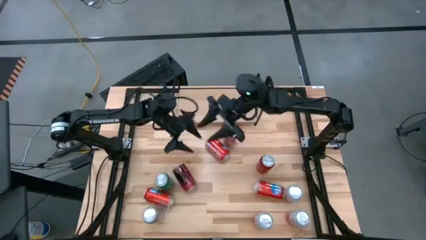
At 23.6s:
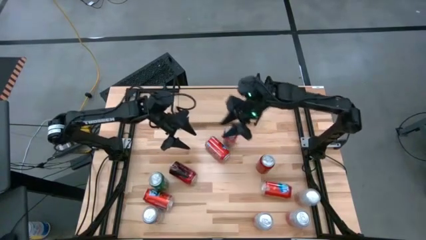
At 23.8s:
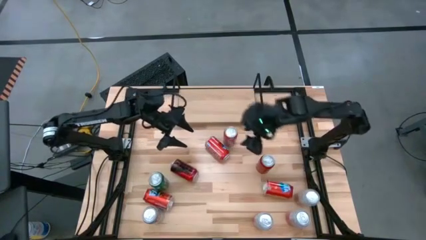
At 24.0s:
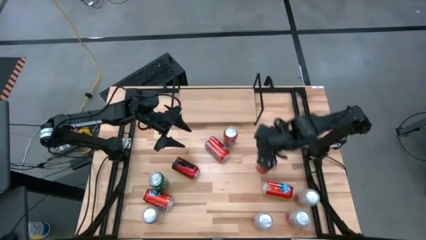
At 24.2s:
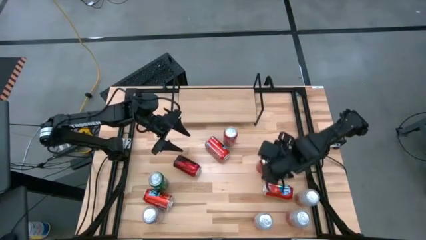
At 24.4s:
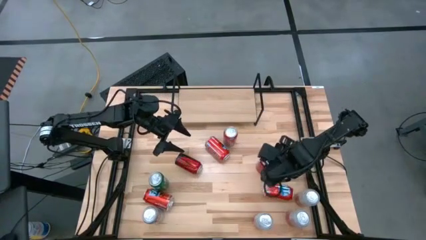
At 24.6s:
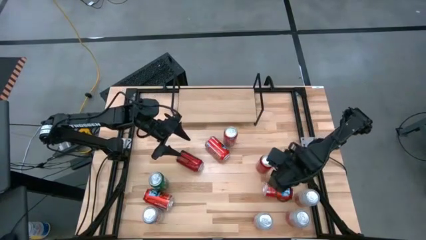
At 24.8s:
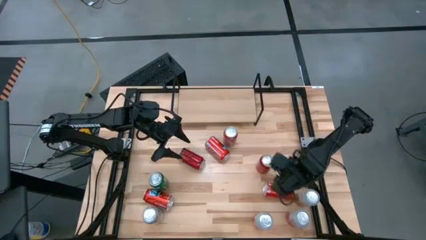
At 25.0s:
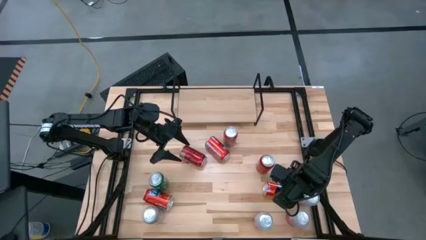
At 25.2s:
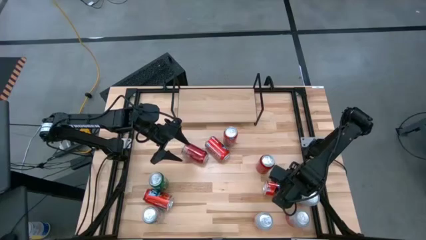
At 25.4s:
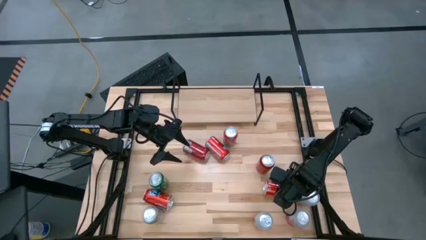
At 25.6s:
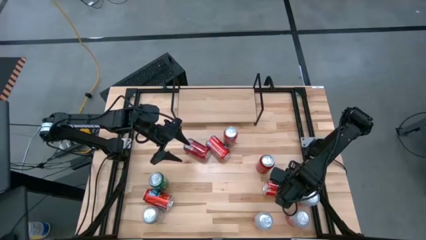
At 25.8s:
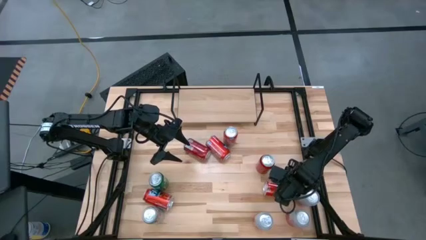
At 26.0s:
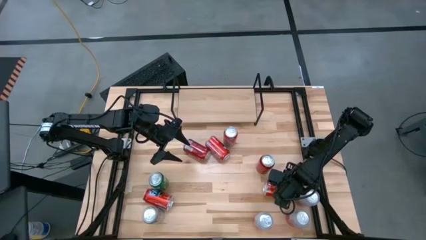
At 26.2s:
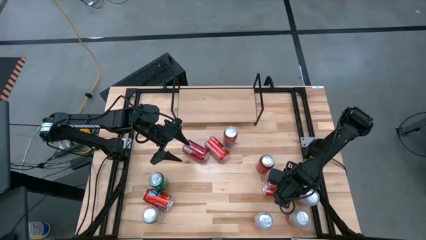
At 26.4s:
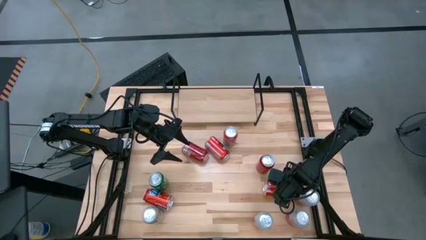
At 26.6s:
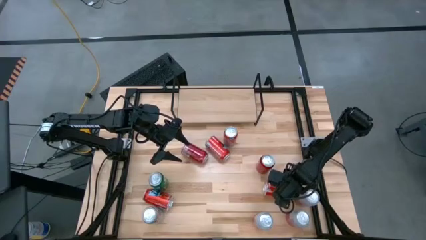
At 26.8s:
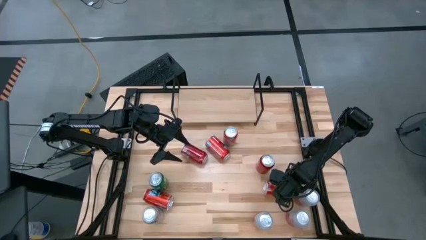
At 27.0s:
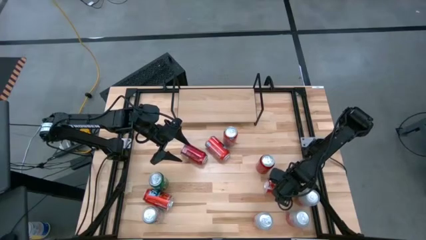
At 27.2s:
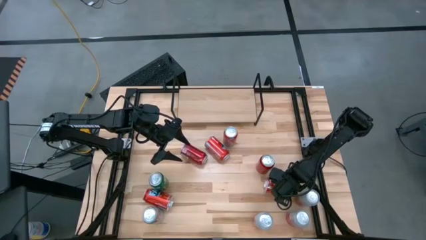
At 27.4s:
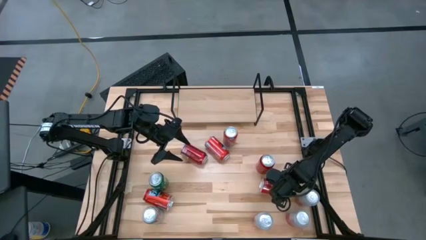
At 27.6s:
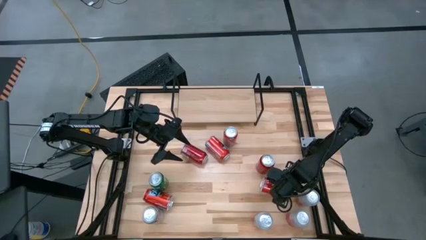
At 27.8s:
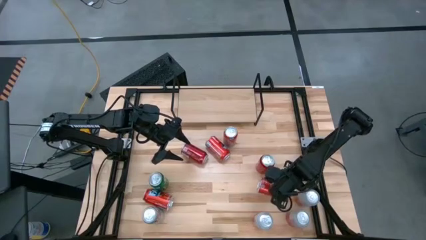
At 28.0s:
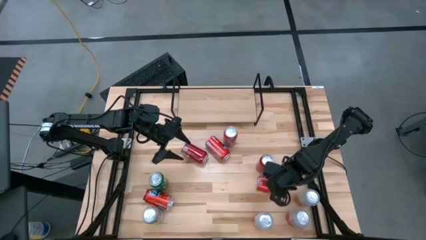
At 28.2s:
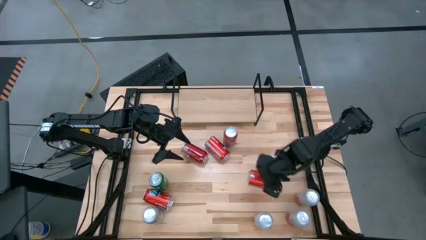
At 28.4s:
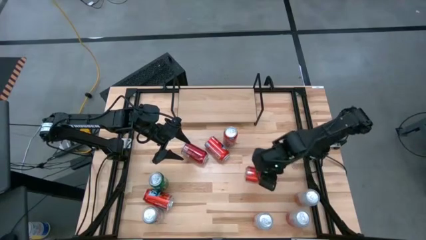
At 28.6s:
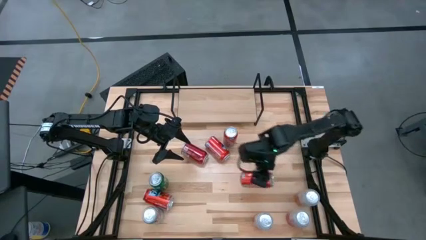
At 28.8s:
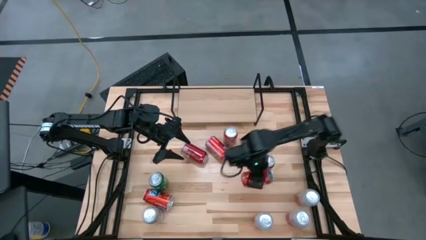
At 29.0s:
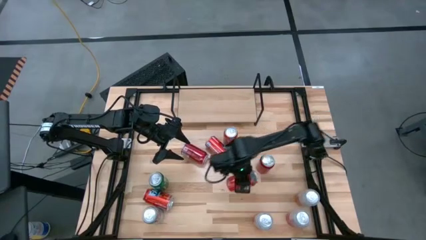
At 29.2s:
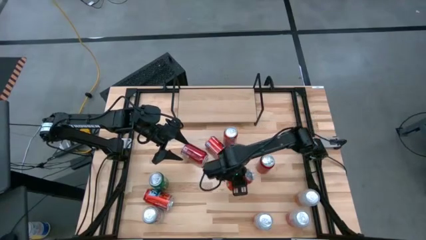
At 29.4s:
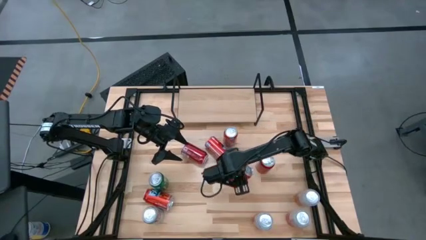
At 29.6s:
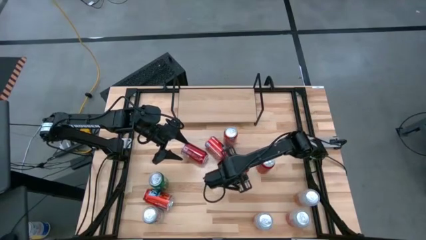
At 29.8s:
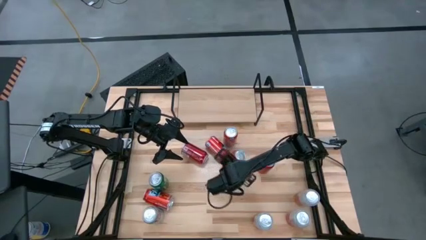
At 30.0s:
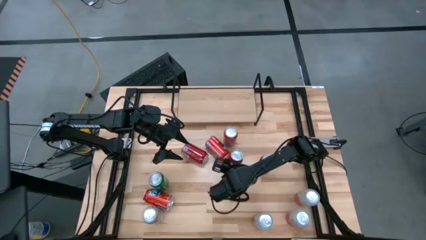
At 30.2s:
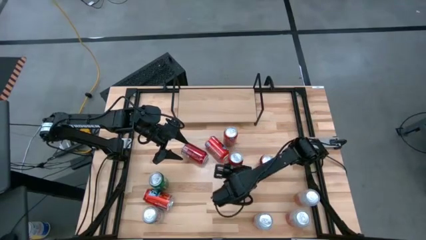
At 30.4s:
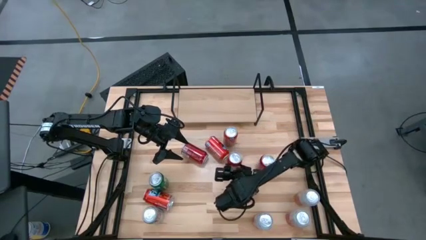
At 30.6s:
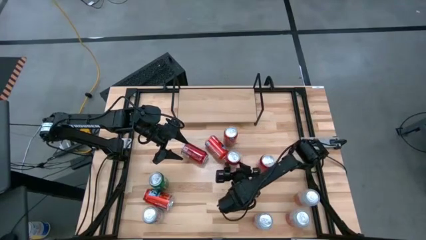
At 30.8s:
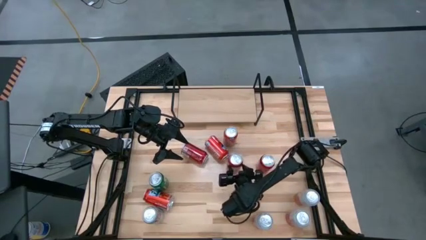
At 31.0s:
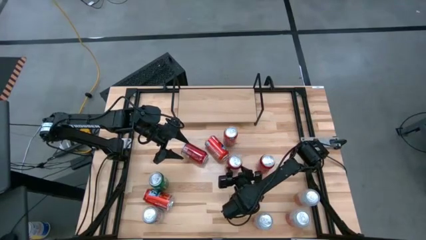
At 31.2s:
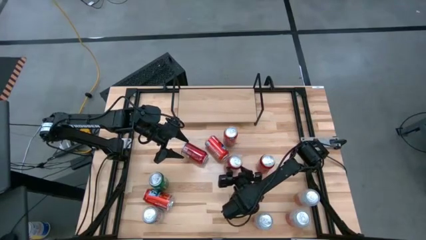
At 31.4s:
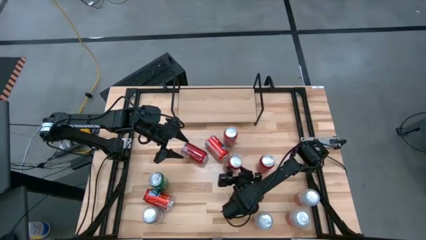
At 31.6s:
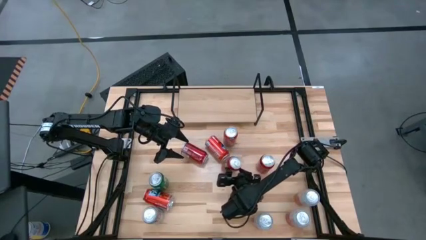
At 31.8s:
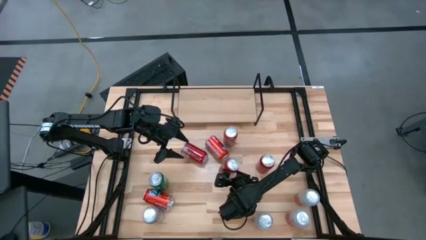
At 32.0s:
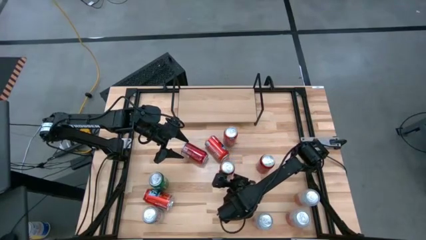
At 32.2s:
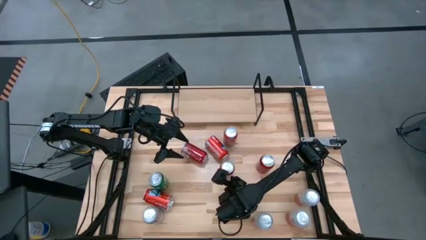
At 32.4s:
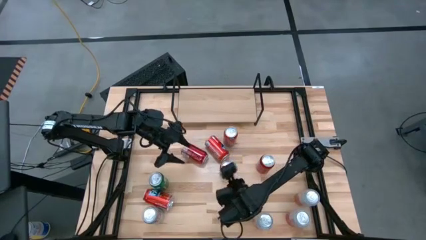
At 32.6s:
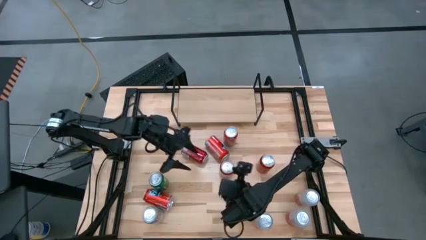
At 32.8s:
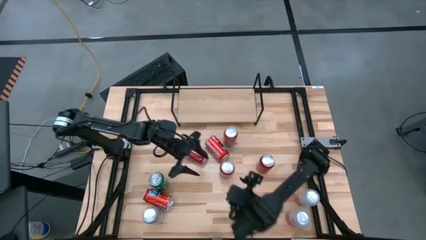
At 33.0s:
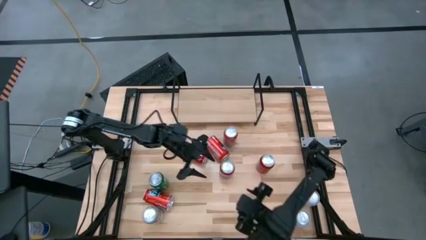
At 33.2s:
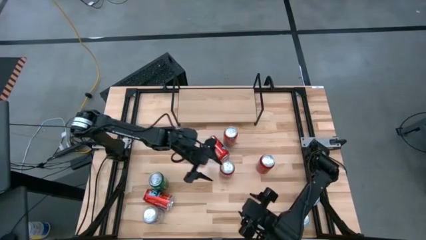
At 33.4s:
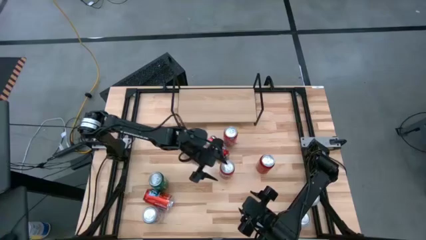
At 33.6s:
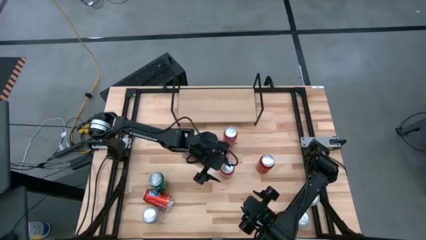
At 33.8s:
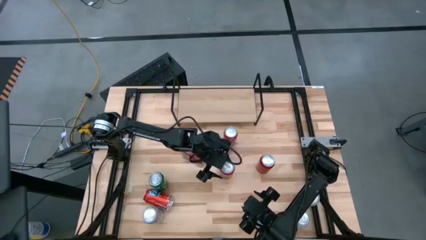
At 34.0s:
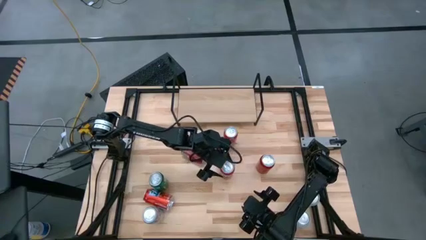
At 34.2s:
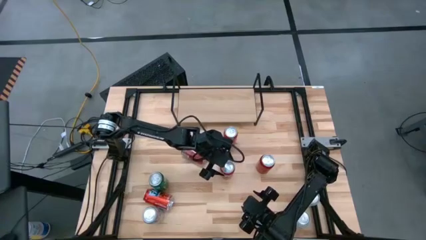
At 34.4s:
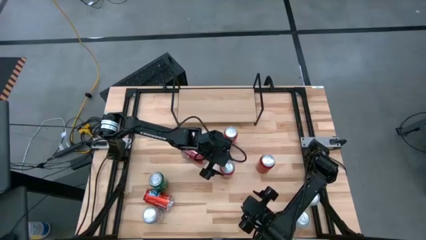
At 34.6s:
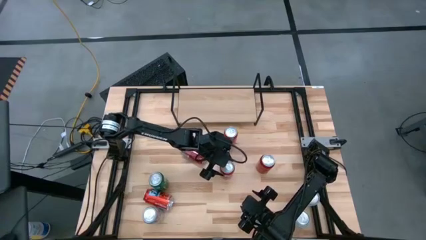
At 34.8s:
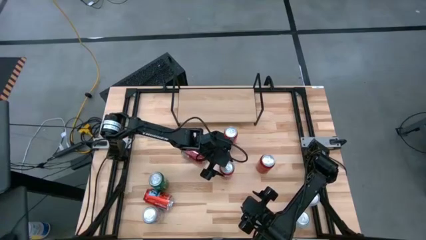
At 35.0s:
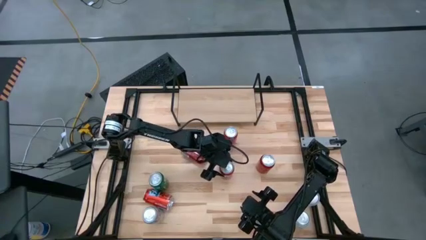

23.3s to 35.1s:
Task: Place canned beverage on shelf
Put the red soda can on the shelf
